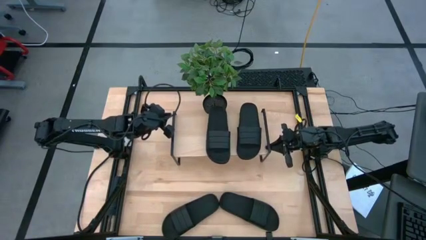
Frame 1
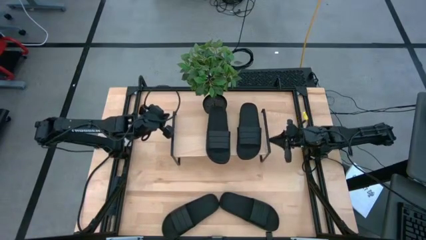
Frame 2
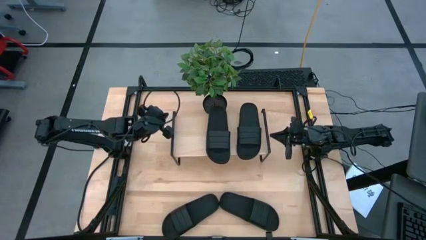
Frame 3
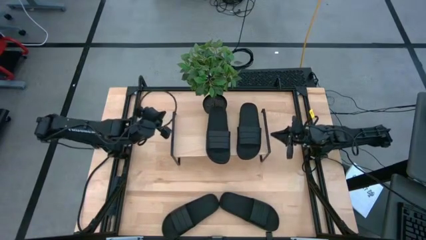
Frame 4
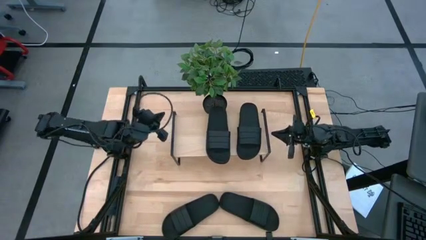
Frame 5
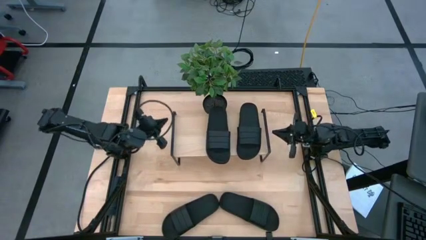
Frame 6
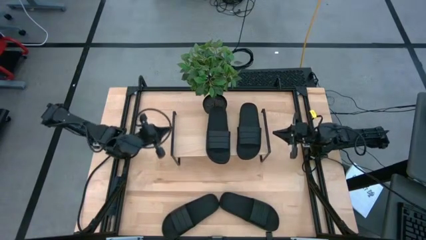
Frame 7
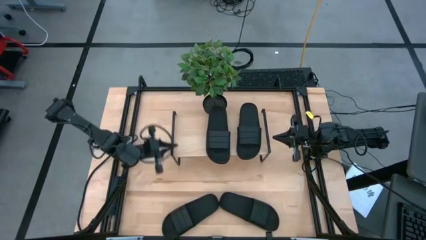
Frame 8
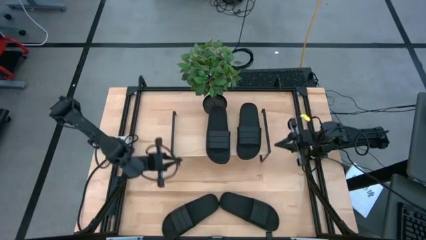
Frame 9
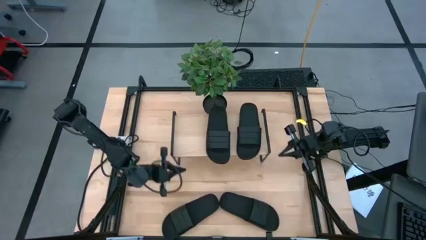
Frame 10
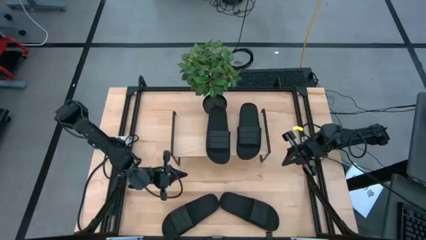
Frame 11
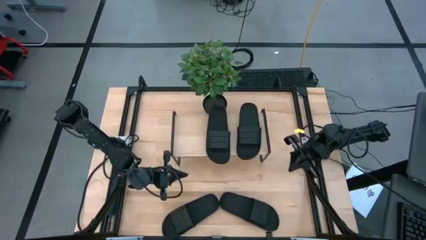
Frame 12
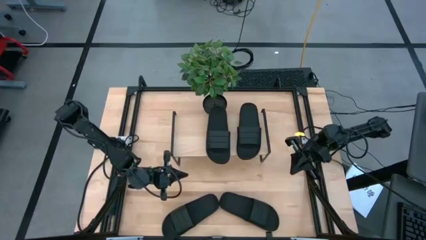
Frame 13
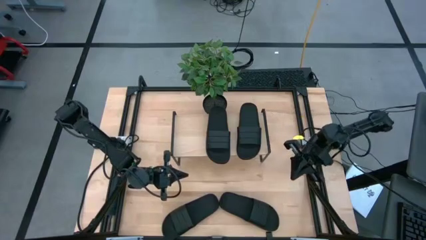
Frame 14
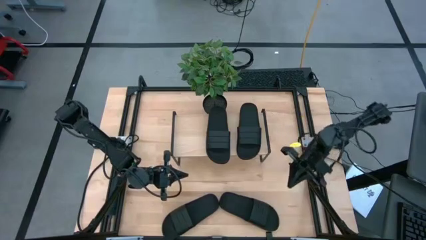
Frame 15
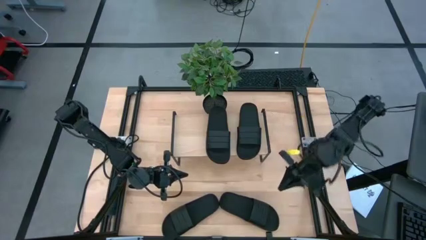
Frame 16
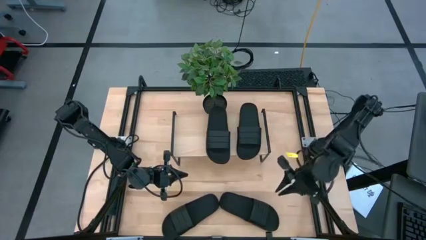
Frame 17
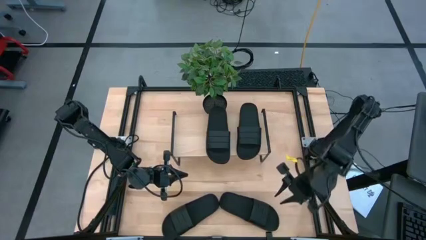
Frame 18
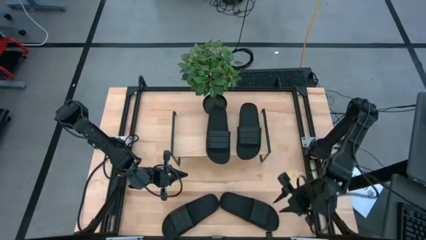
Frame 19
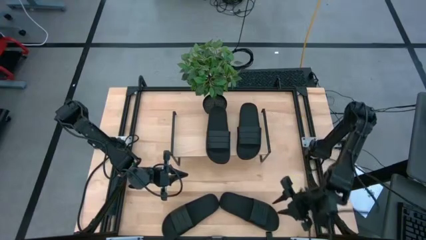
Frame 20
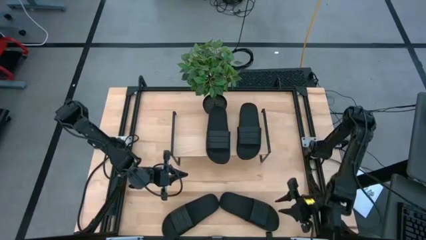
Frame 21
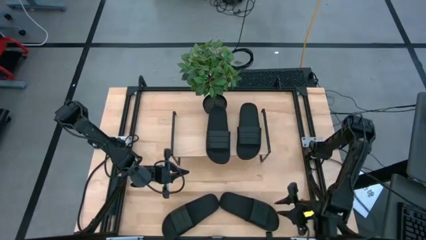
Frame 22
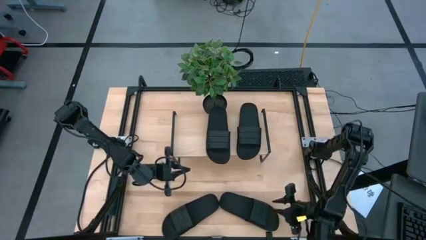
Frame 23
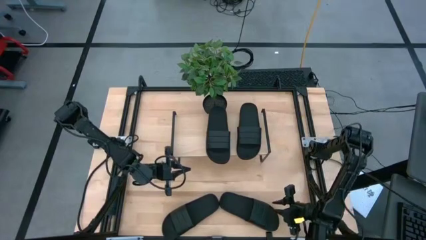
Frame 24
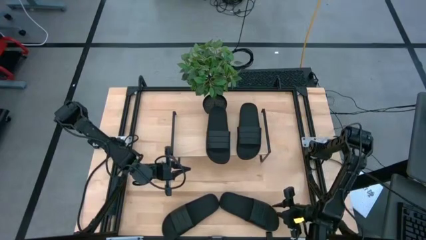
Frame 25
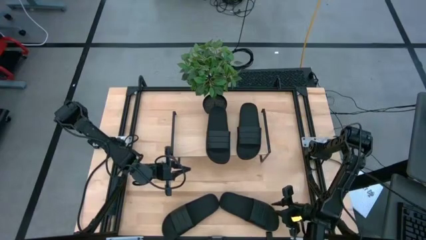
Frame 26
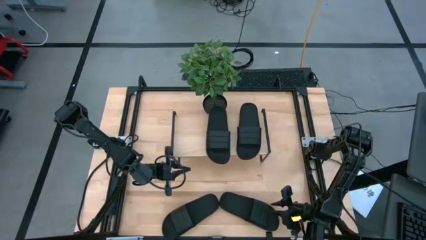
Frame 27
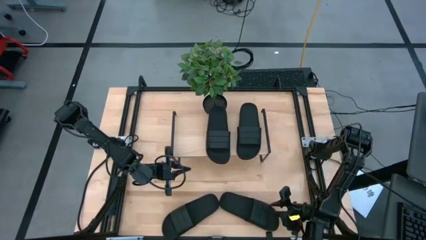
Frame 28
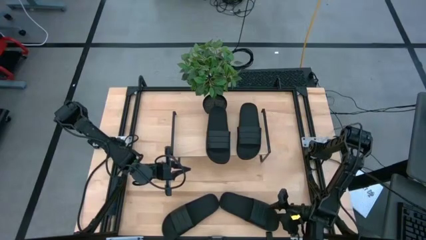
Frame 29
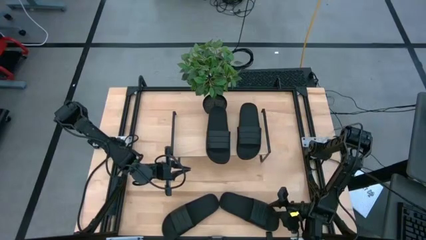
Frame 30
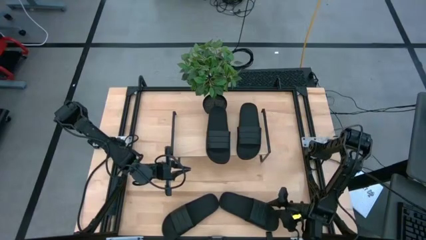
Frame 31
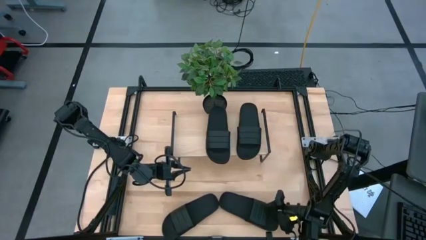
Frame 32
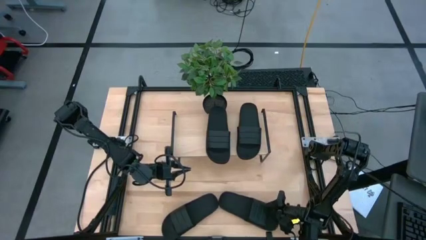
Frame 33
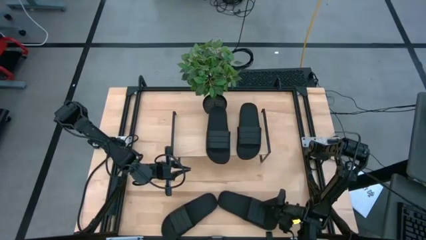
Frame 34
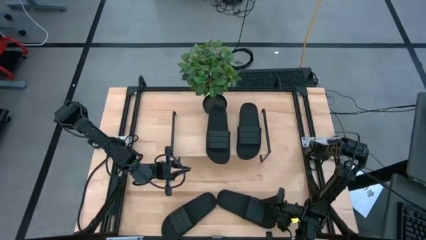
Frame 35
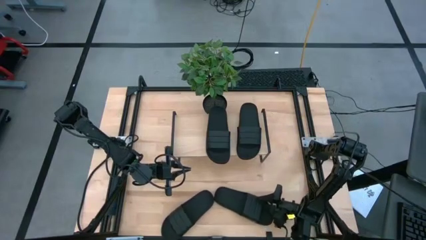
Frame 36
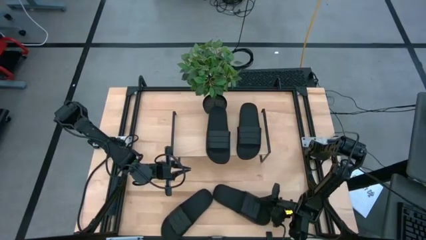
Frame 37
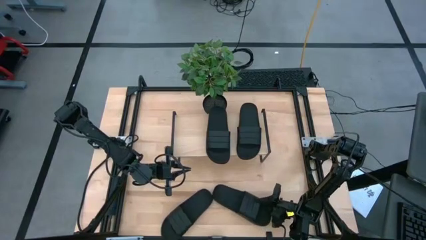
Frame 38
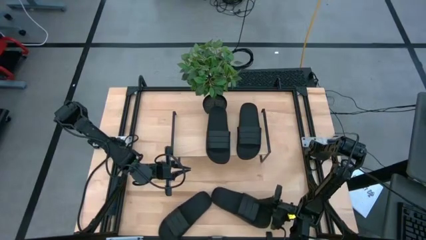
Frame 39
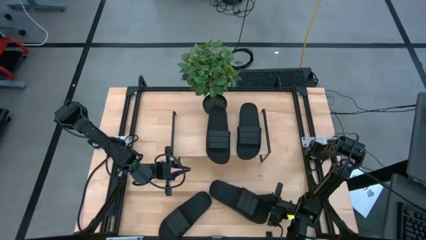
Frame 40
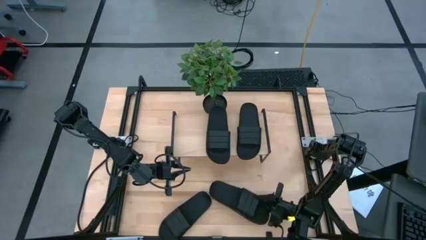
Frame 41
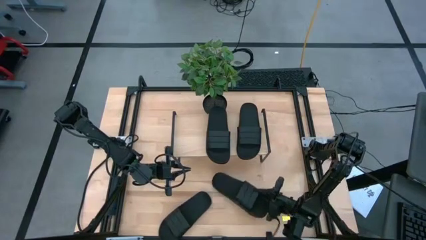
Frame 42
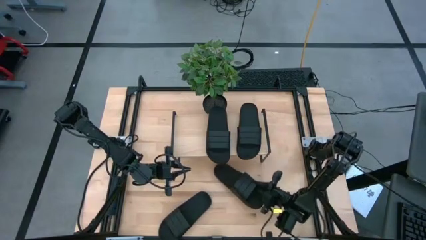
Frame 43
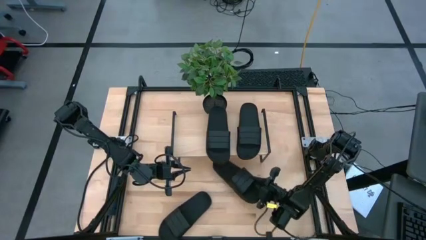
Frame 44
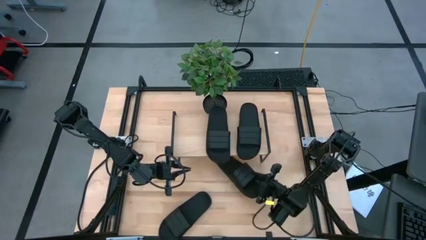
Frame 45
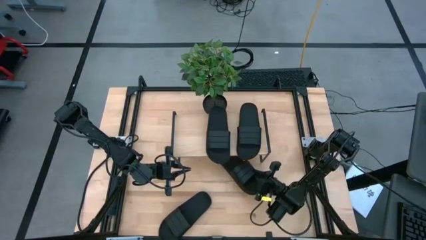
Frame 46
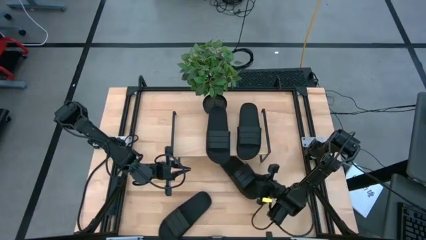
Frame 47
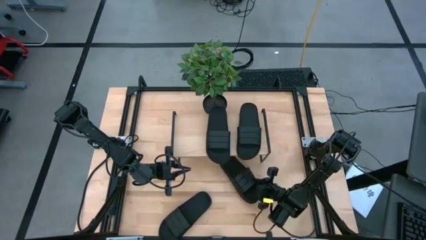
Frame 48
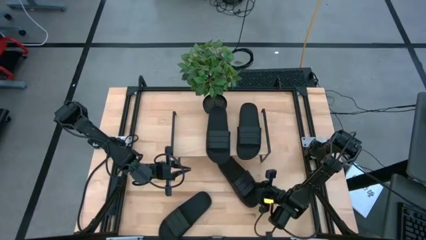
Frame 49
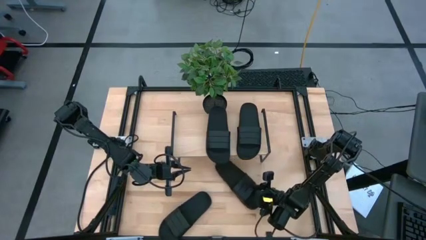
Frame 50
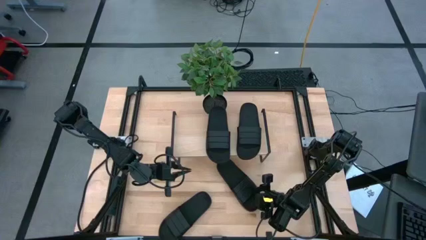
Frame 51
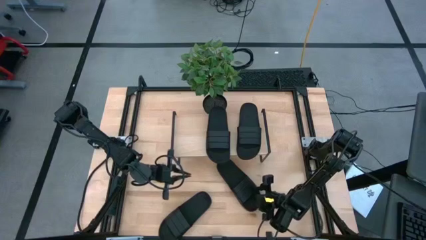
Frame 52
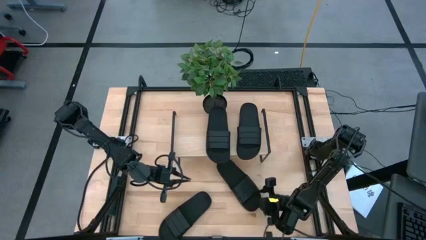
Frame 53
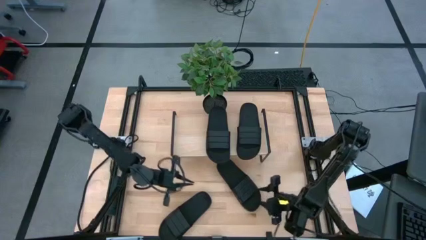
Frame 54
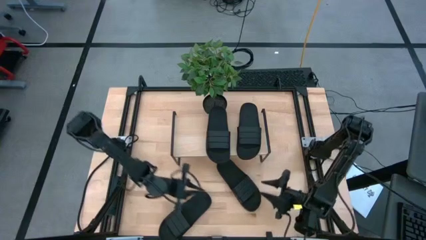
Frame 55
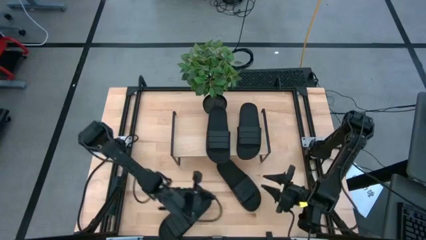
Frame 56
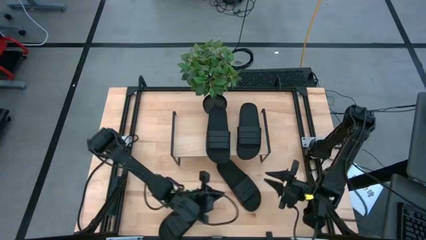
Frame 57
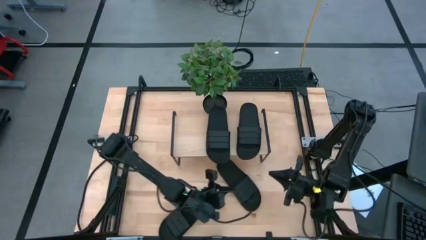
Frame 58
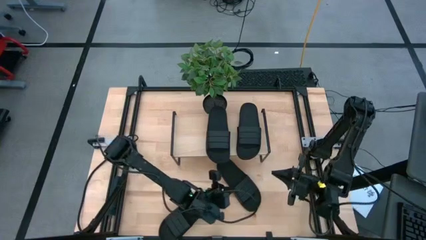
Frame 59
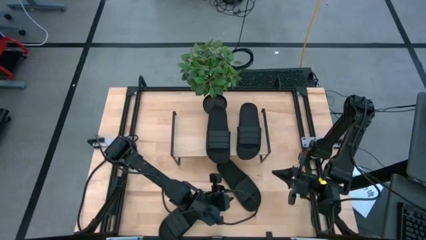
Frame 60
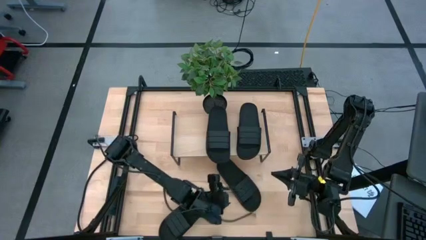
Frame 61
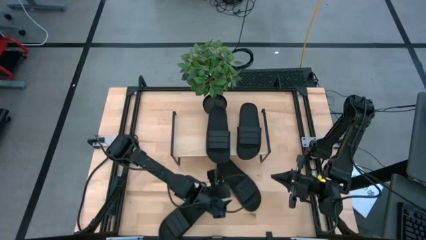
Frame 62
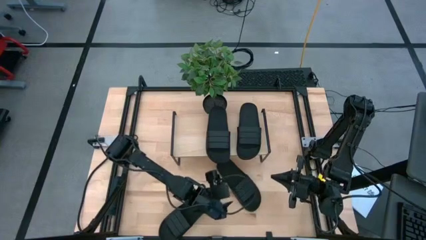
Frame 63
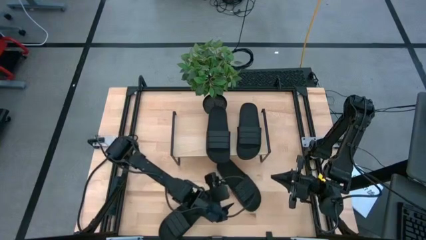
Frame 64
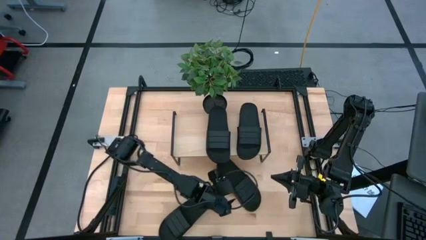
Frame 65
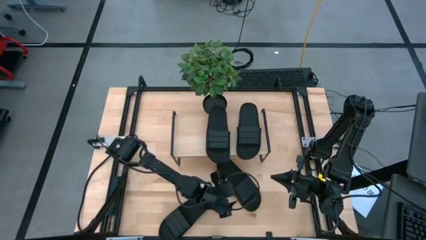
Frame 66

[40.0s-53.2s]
Task: Pick and place slides into the shelf
Put the black slide under the shelf
